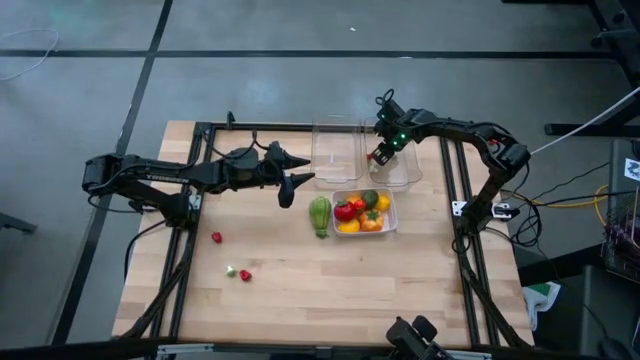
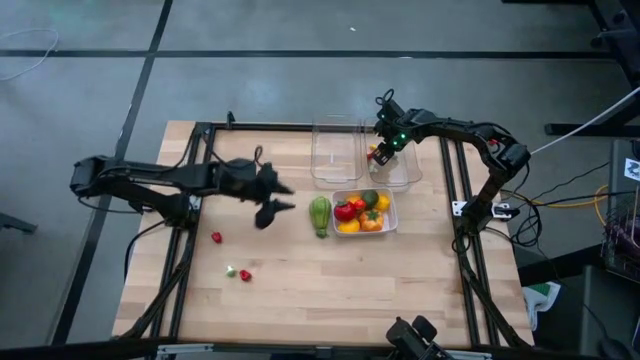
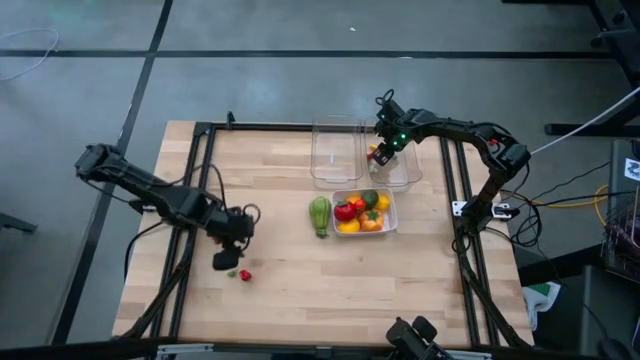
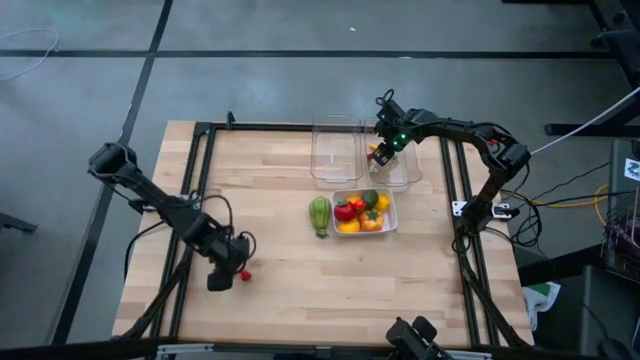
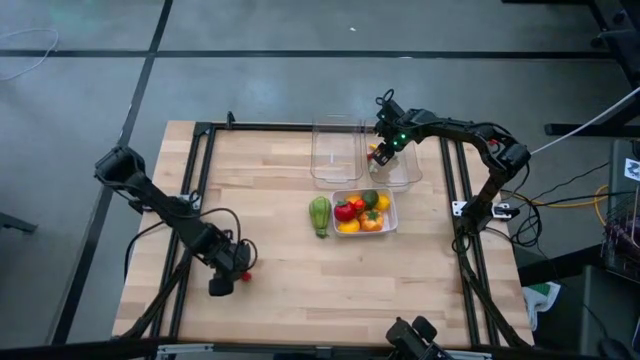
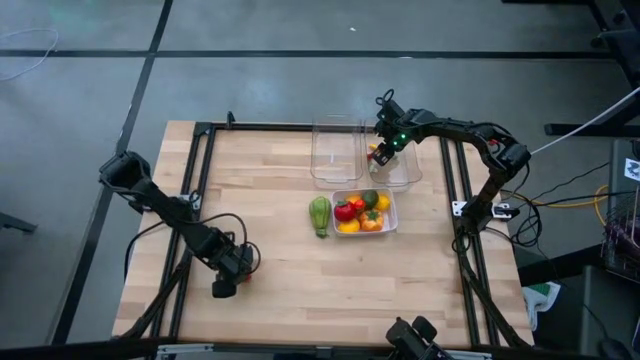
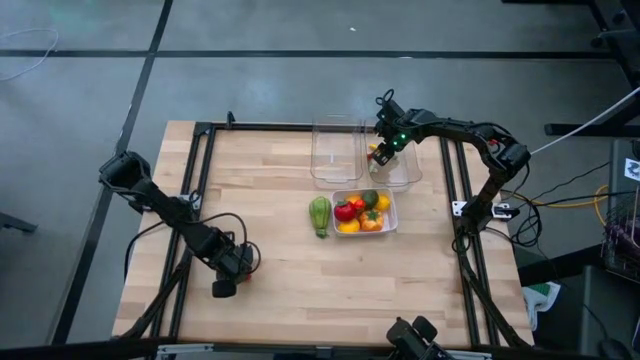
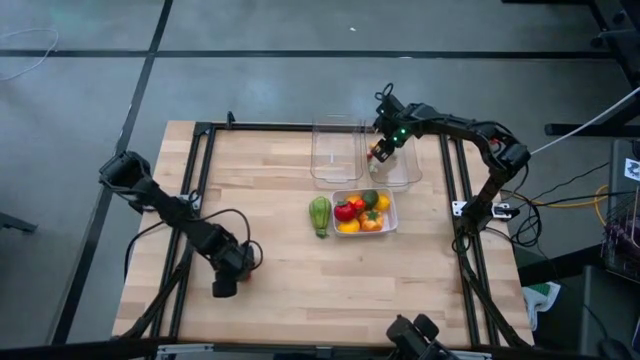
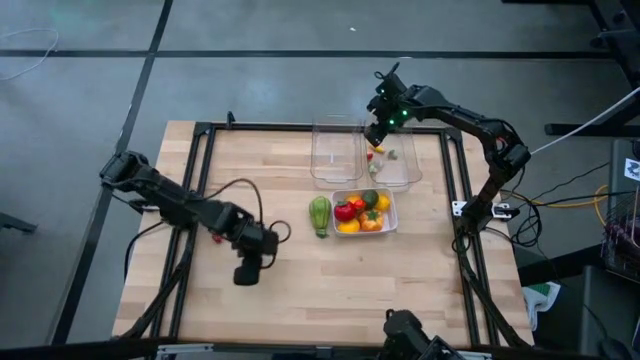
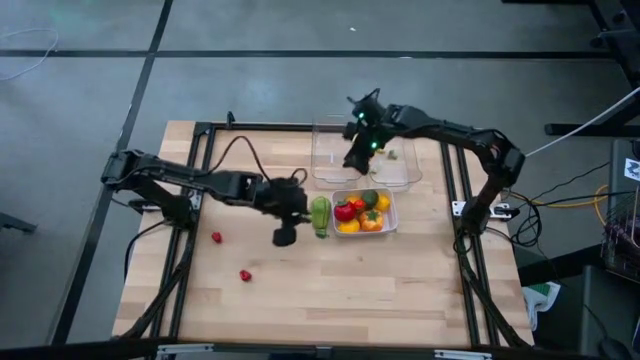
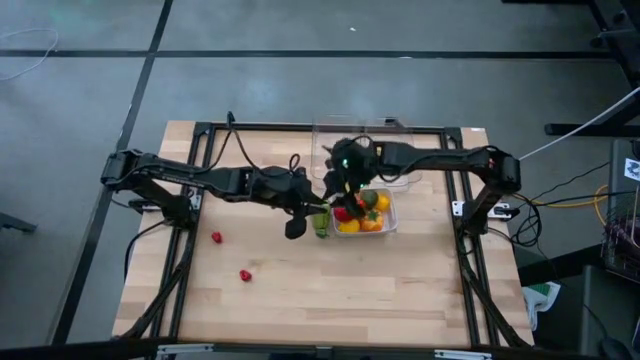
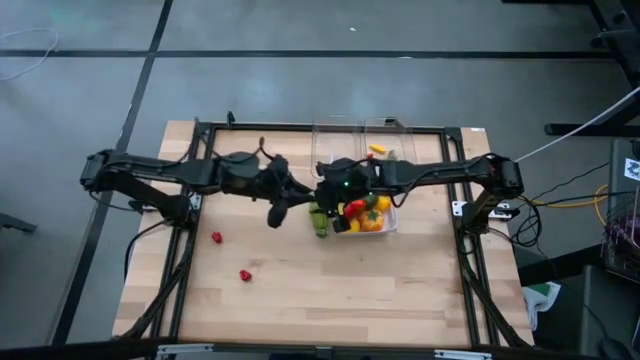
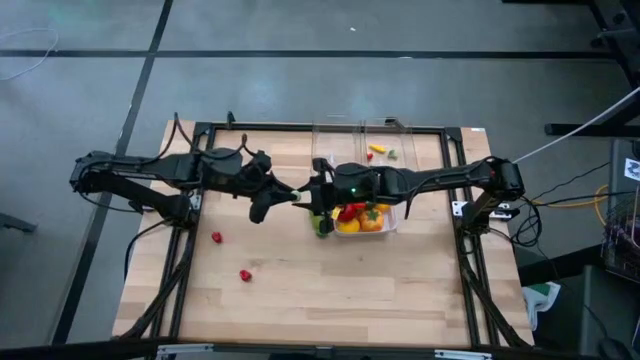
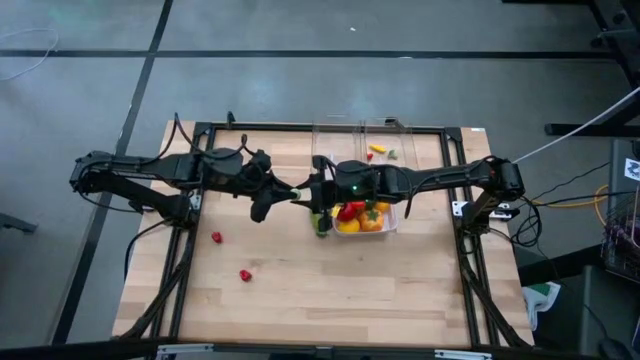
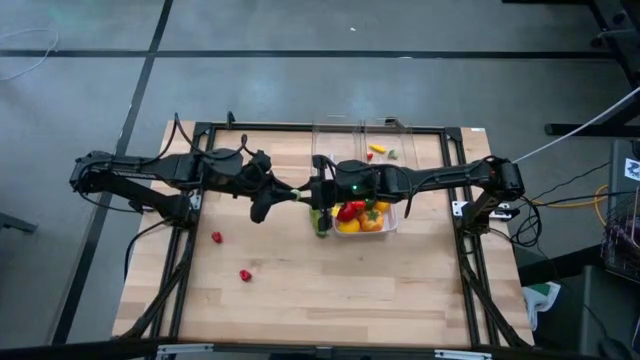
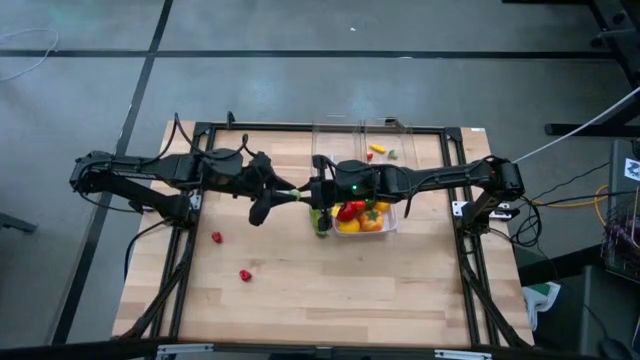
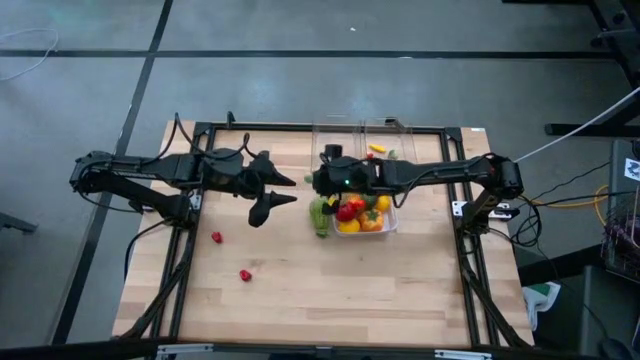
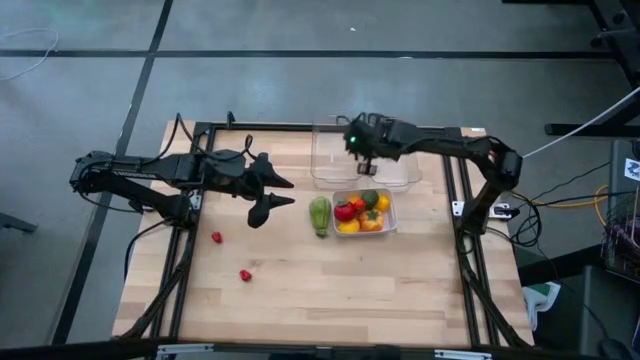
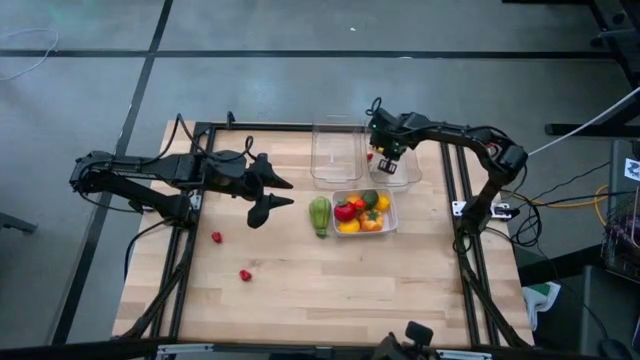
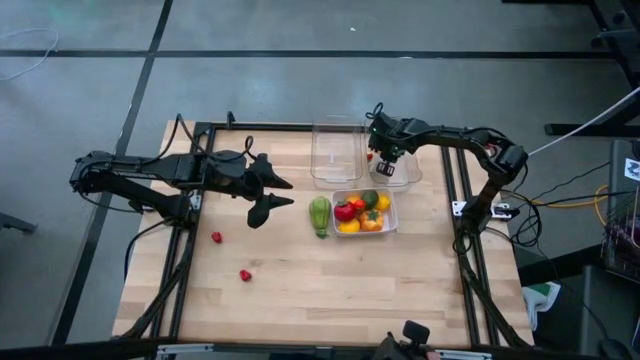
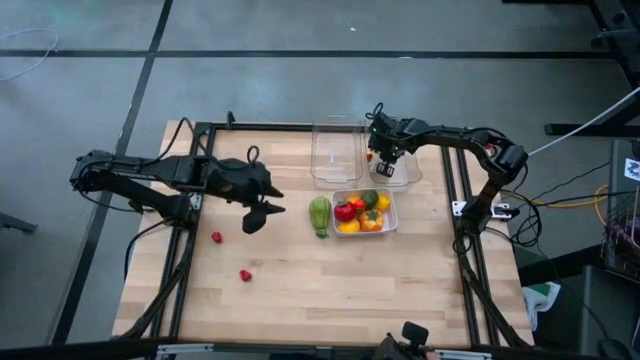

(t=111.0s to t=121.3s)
Task: Sort produce into baskets
Put the green mushroom into the right transparent bin

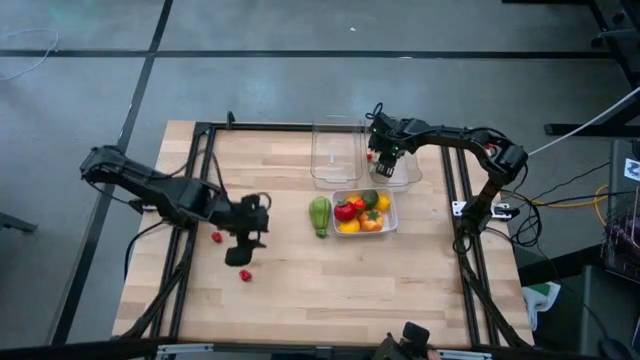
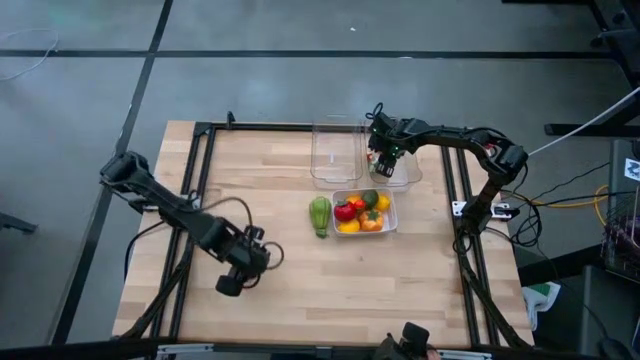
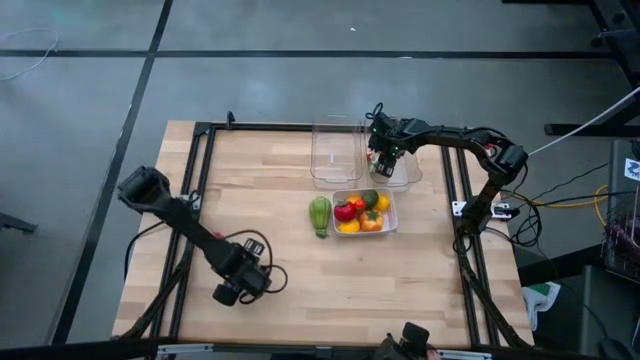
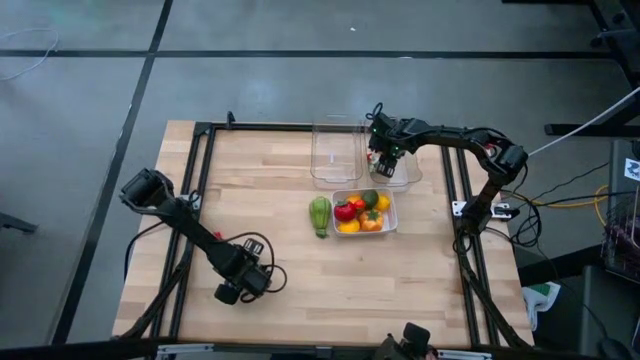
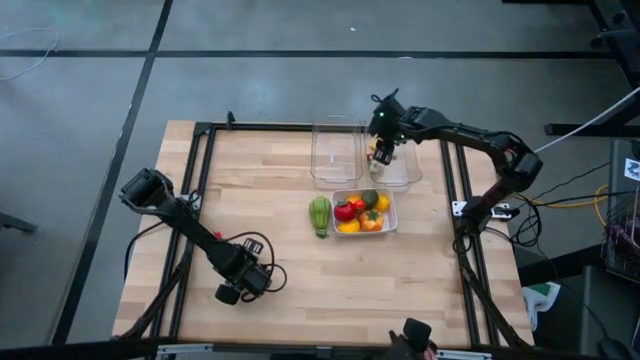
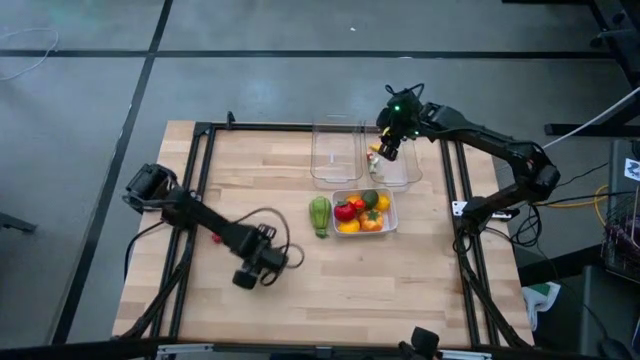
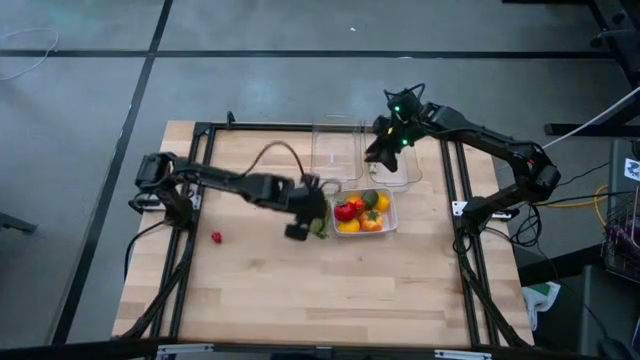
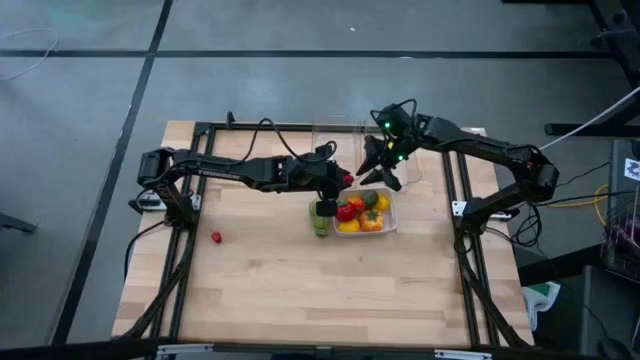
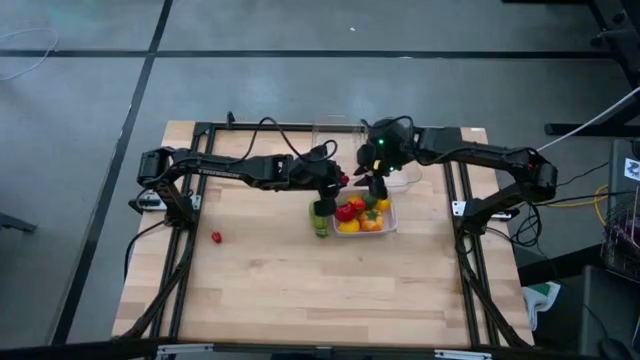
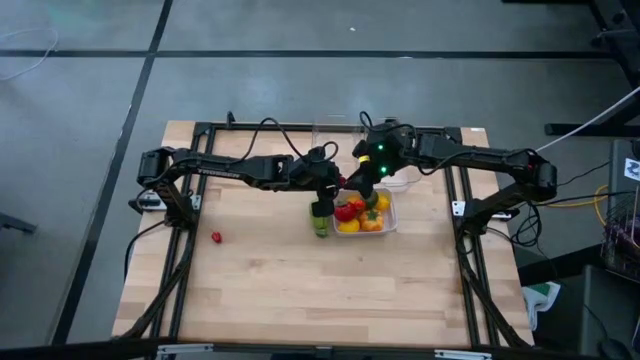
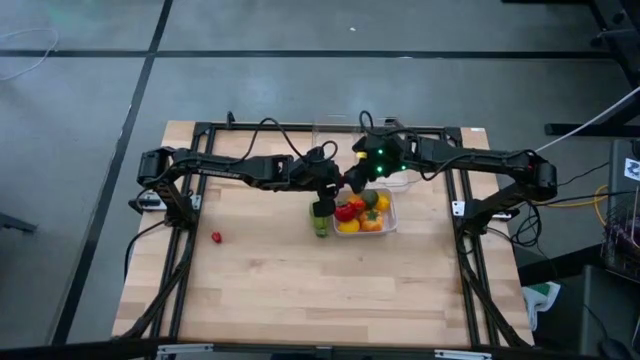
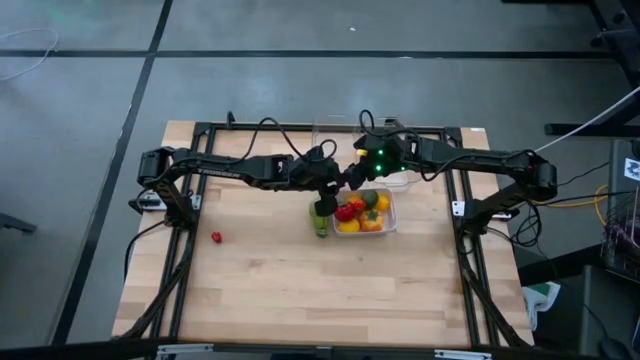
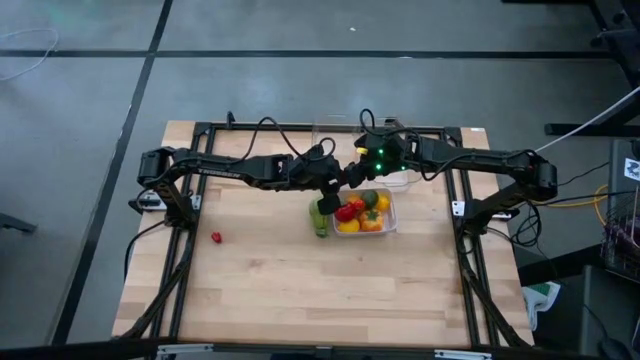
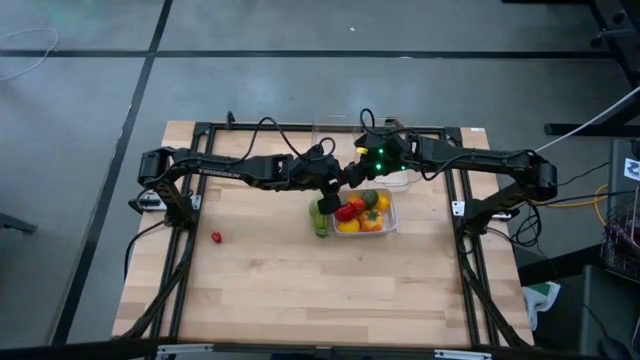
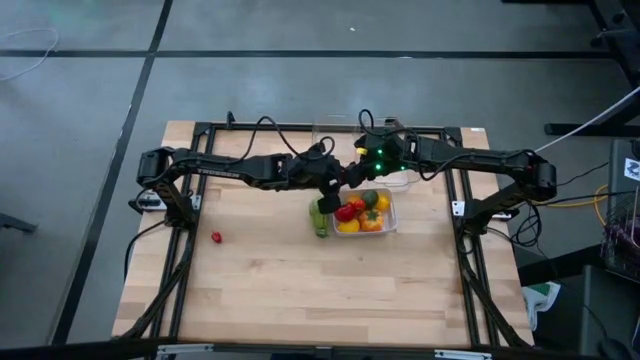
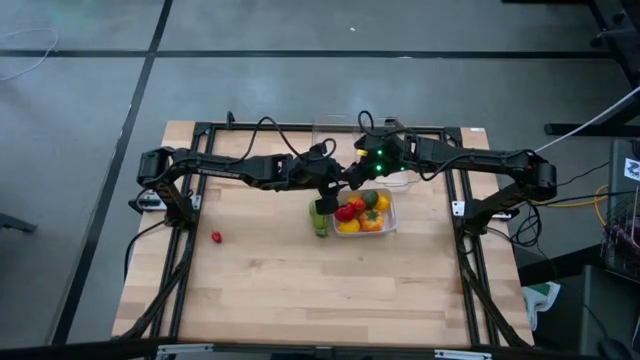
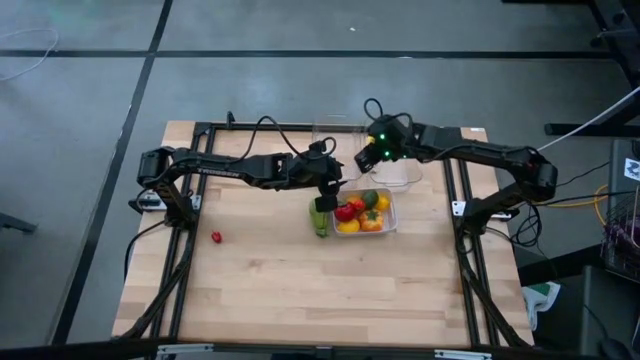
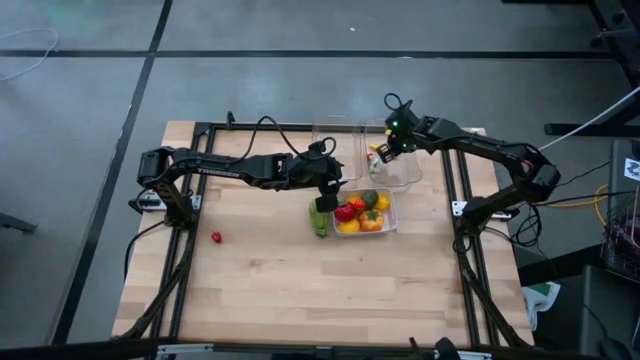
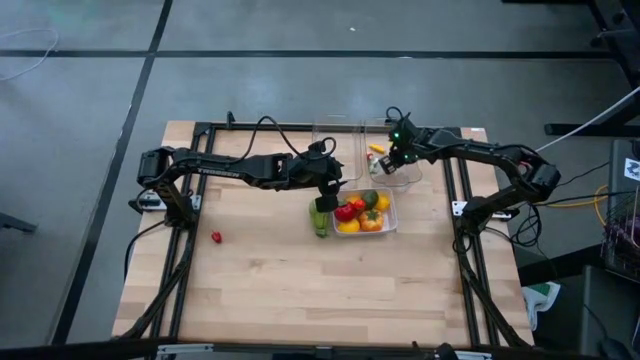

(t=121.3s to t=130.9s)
Put the bottom red bell pepper into the right transparent bin
